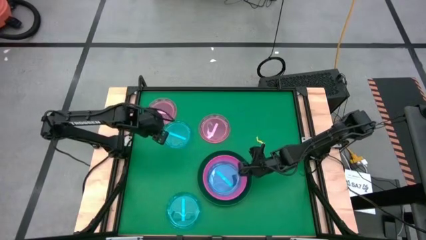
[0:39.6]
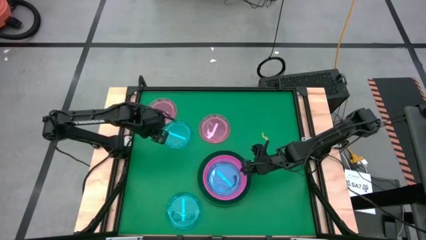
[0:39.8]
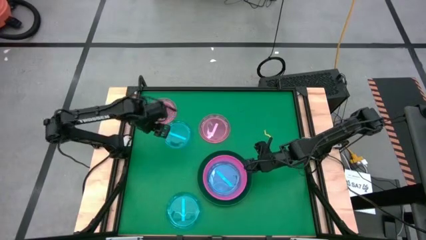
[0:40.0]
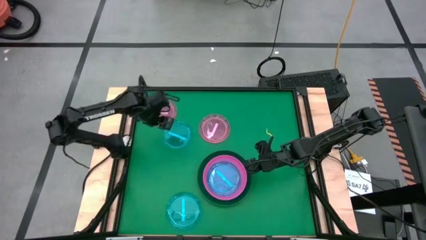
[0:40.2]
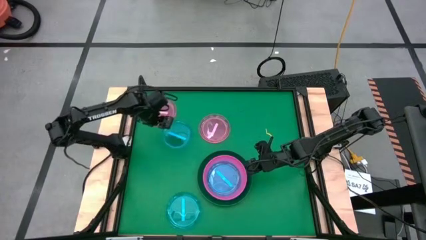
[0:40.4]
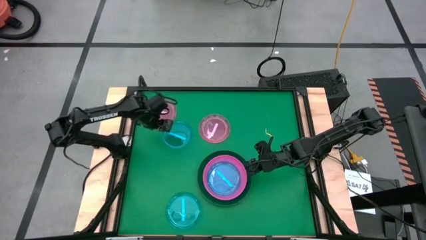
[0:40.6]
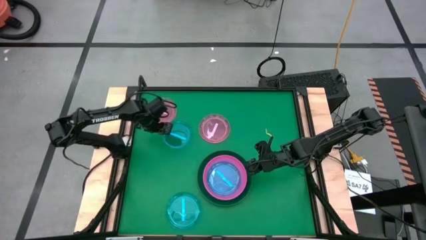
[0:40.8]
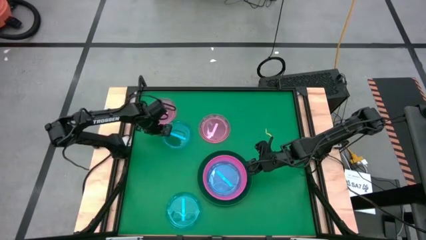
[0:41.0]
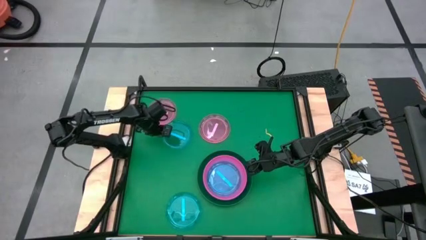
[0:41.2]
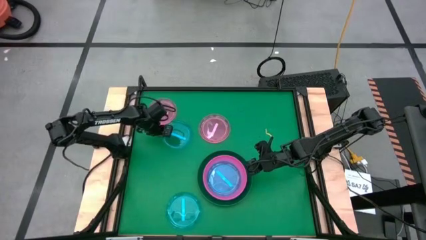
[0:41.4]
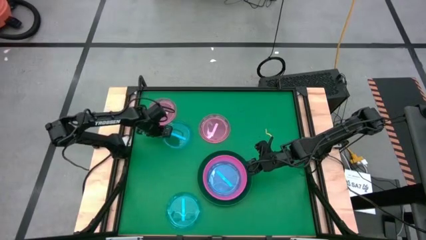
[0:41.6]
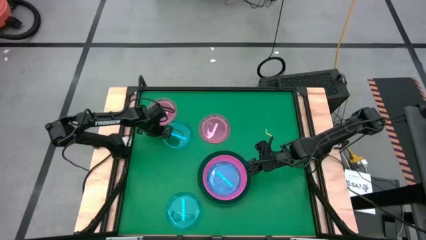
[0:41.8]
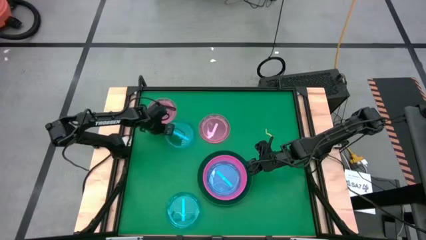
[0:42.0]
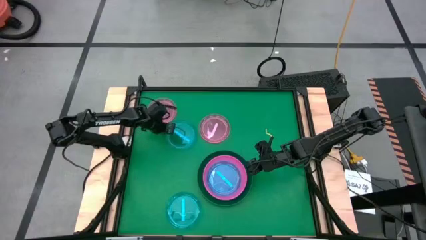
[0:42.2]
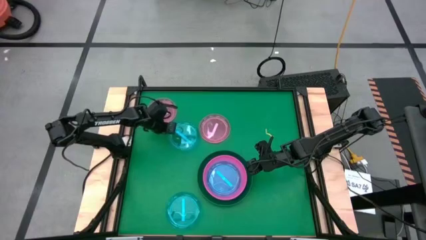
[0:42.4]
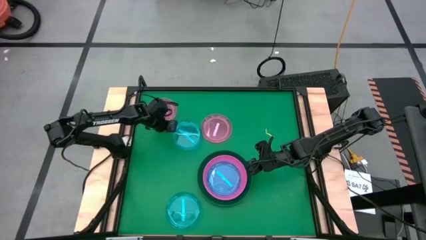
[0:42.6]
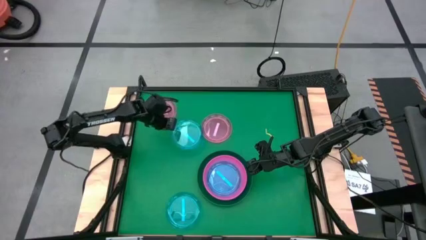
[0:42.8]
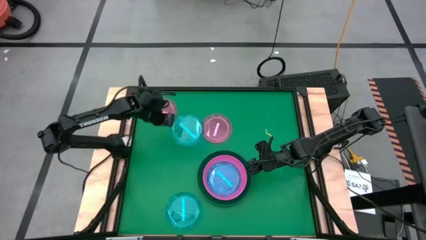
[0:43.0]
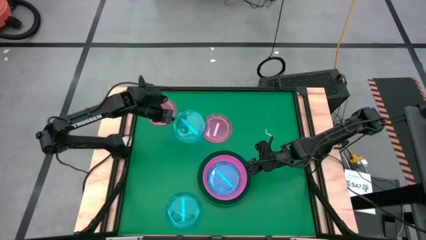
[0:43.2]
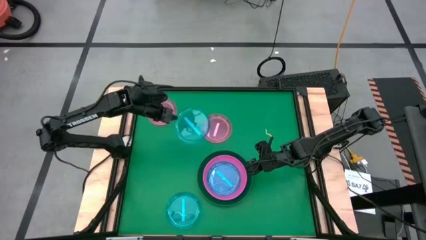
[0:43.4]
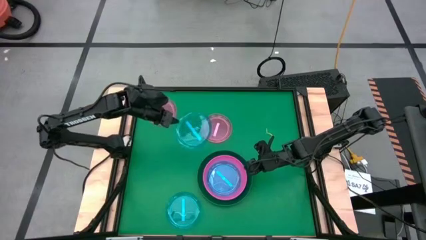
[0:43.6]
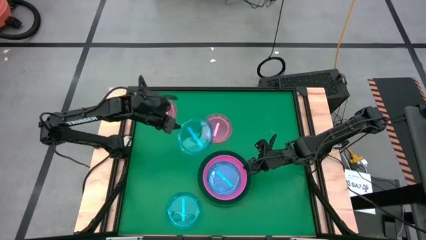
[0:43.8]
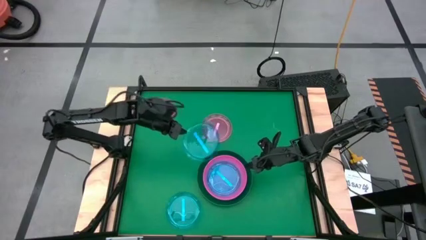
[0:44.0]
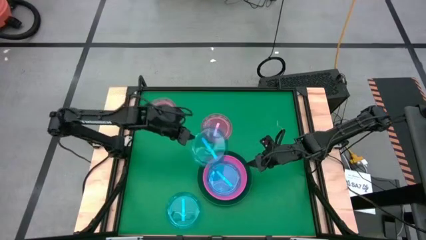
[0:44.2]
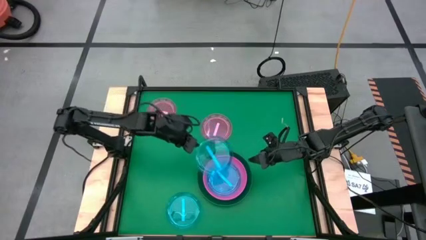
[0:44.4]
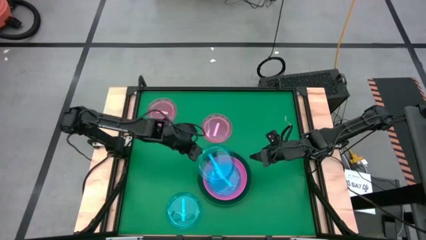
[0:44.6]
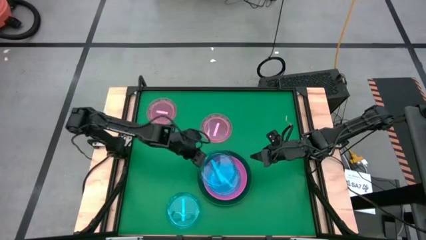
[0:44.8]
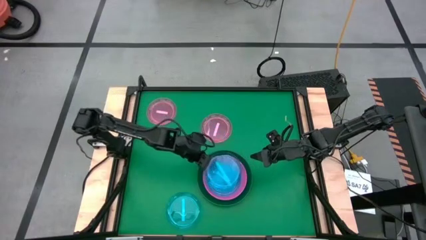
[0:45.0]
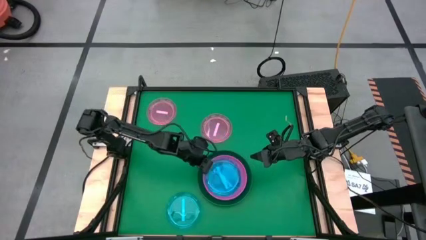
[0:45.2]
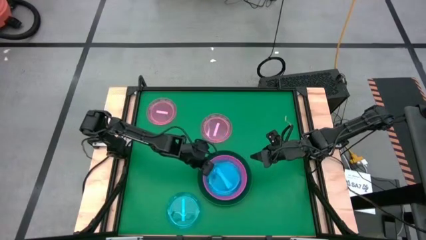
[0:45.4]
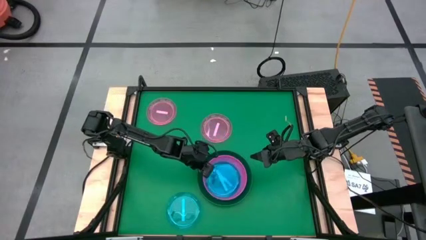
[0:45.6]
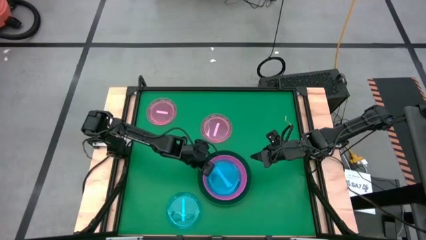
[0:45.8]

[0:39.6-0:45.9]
Task: Stack plastic plates
Stack the top blue transparent plate on top of the other blue transparent plate

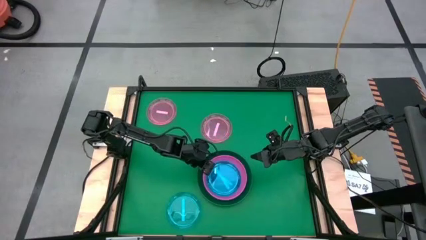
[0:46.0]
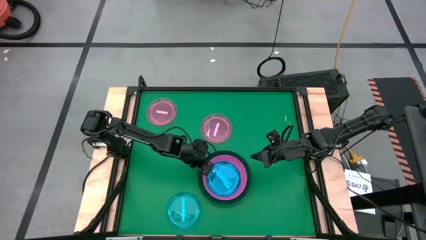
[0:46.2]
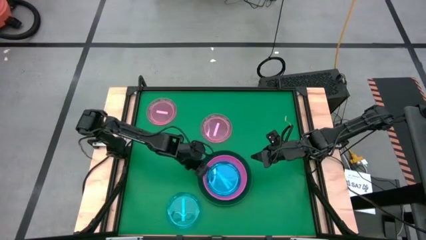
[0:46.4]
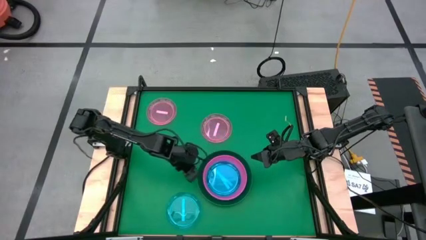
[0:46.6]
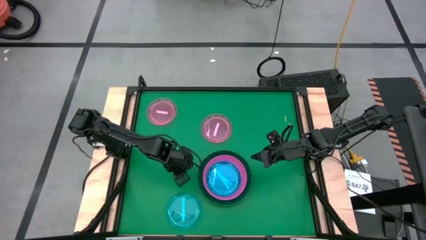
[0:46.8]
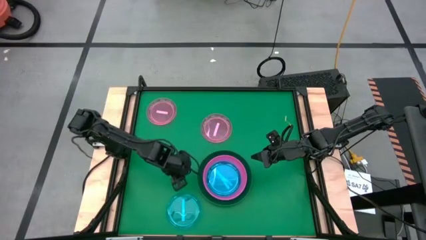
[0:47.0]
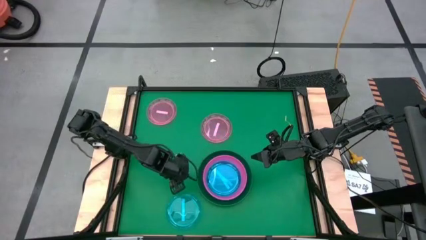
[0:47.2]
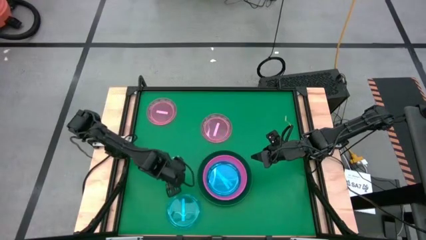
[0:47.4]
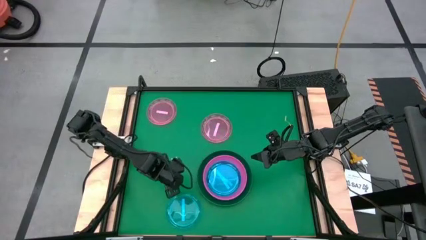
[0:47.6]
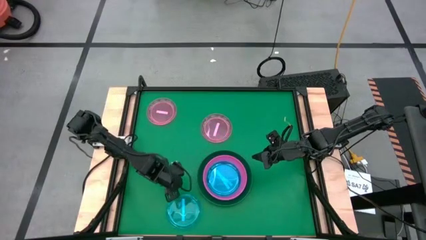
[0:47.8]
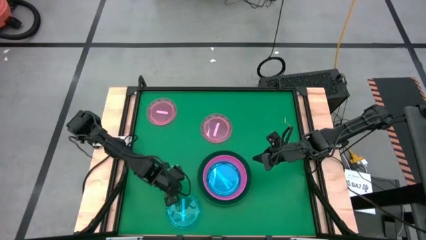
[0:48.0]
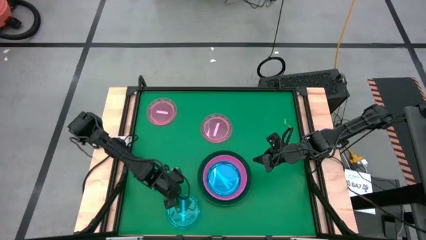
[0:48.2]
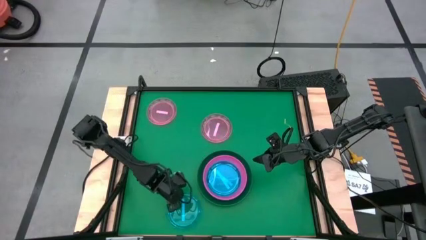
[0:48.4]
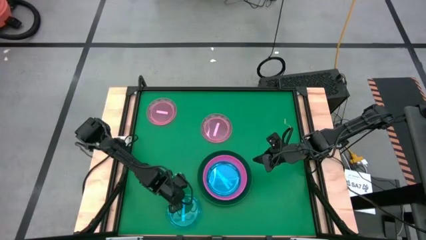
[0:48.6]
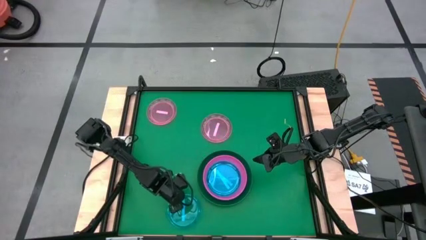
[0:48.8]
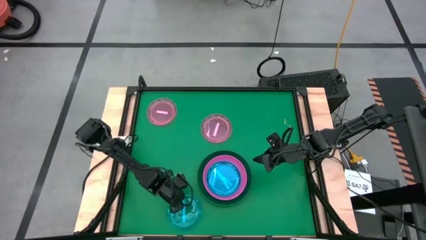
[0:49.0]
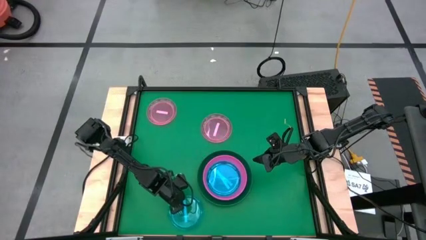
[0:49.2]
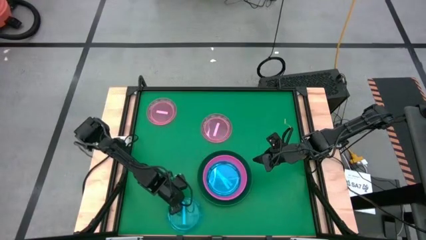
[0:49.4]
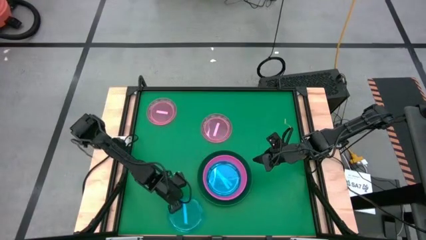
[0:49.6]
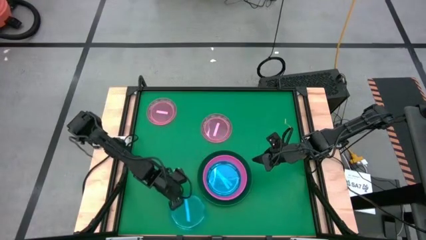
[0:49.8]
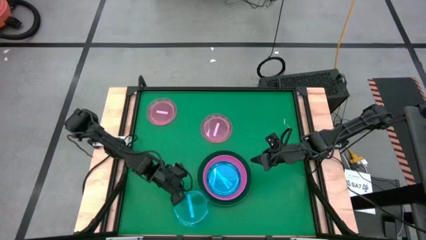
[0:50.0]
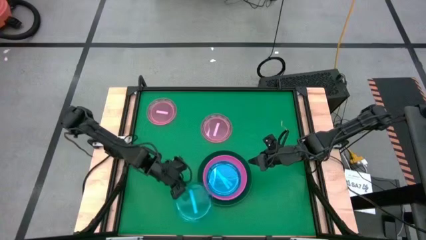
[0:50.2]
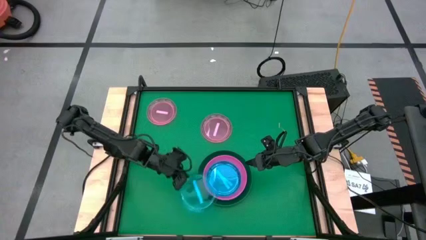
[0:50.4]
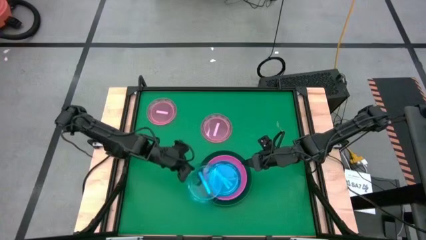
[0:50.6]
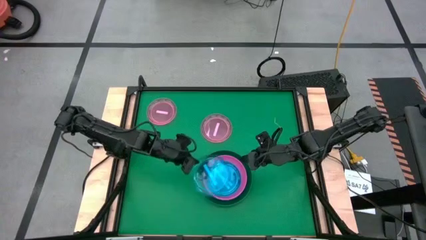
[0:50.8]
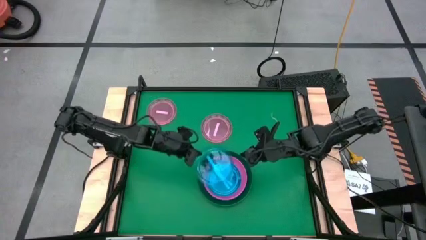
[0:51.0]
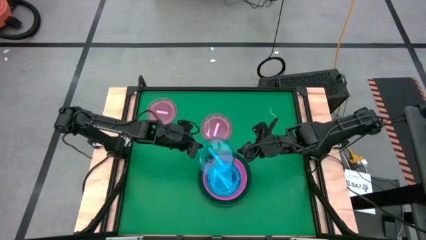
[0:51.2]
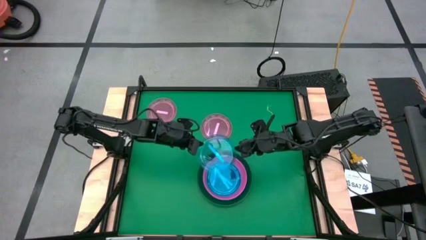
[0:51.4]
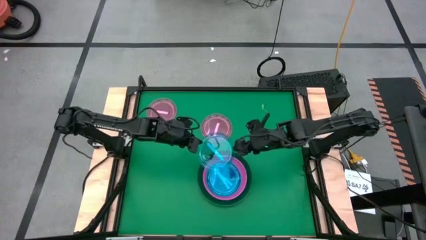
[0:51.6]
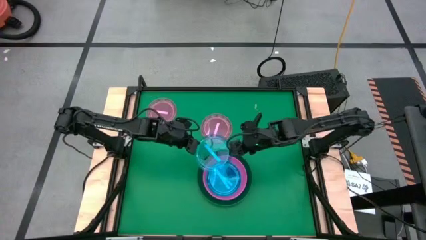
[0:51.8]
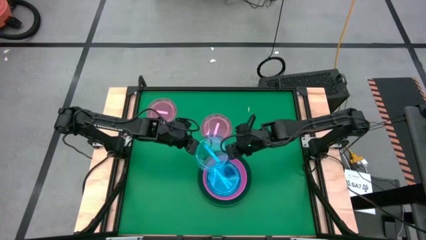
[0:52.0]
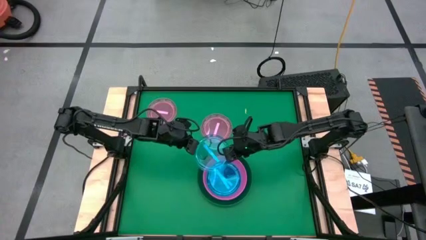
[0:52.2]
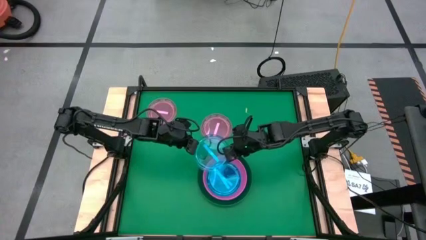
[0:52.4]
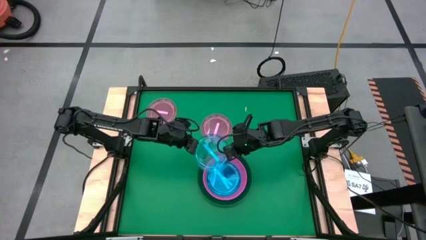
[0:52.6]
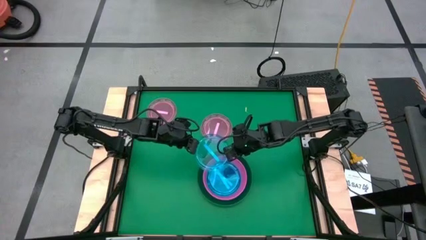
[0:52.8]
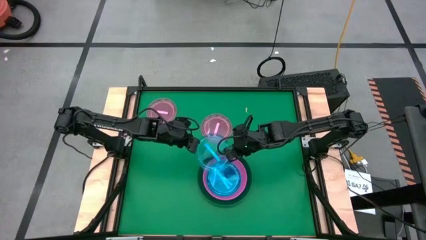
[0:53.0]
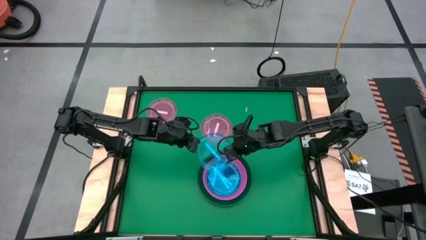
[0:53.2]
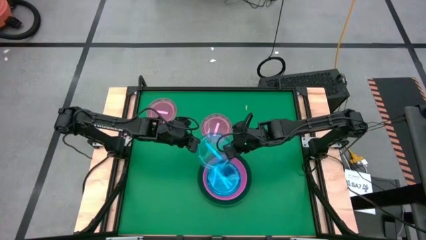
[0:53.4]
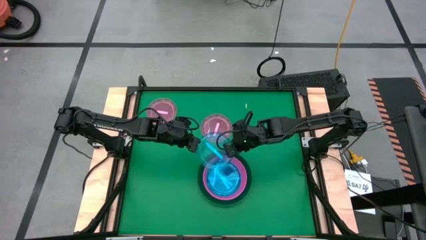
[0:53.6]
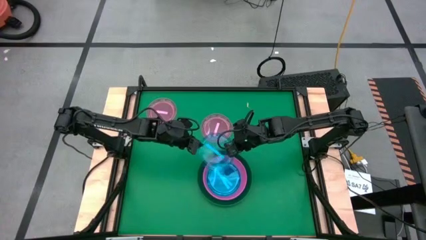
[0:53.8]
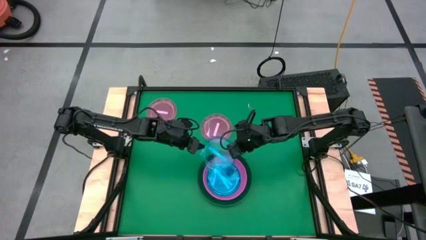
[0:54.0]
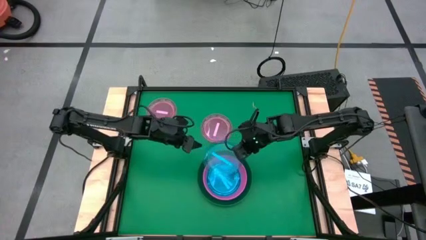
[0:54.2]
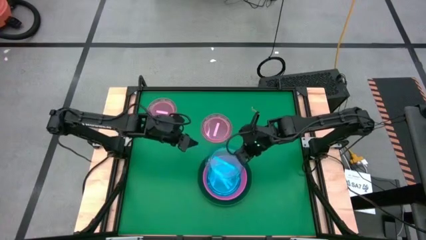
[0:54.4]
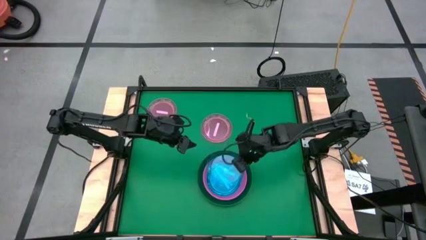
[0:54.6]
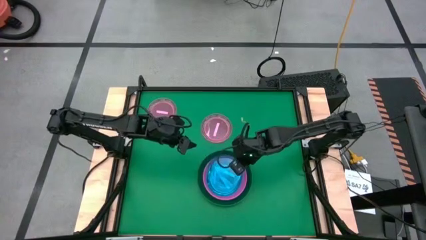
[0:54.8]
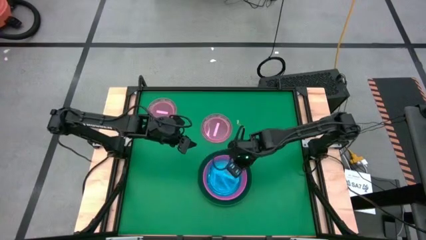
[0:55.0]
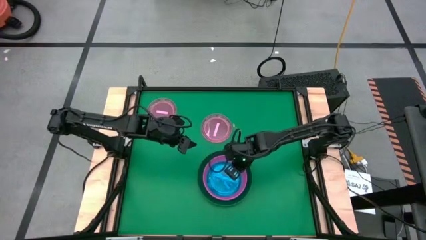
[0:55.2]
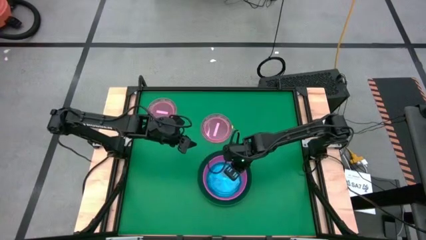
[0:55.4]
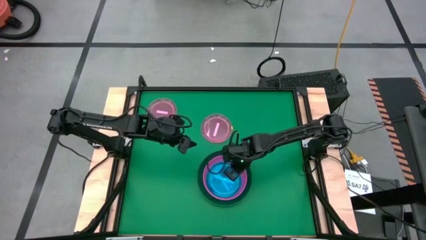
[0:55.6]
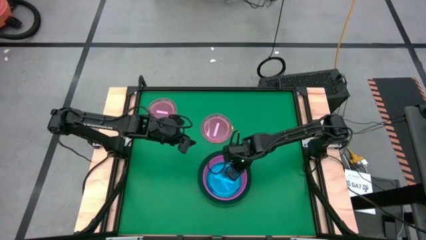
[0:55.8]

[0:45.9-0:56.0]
Stack the blue transparent plate on top of the other blue transparent plate
